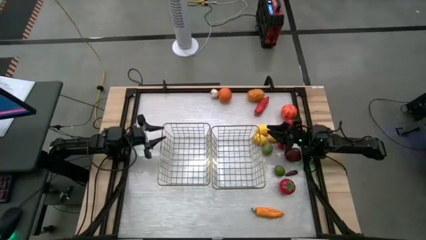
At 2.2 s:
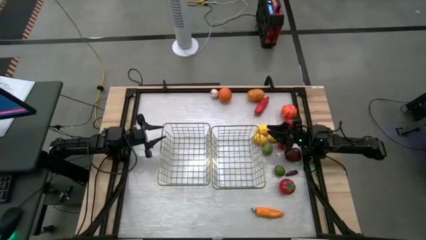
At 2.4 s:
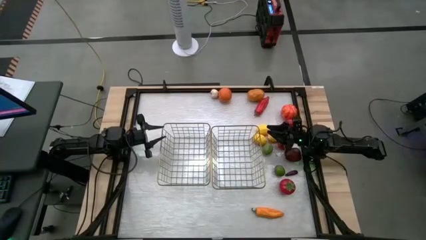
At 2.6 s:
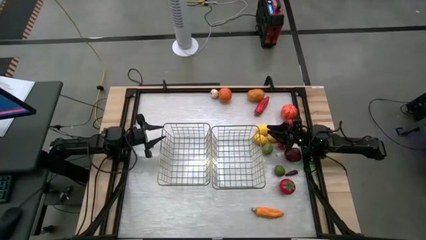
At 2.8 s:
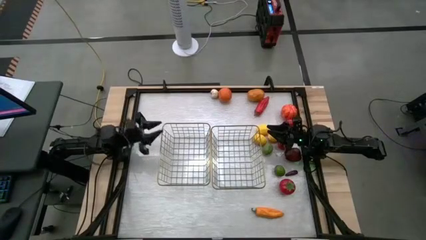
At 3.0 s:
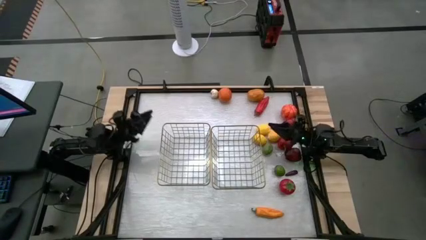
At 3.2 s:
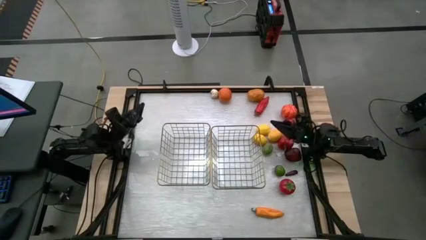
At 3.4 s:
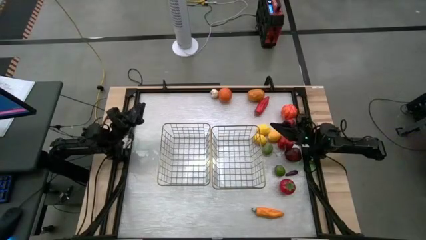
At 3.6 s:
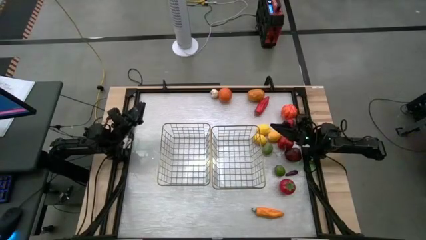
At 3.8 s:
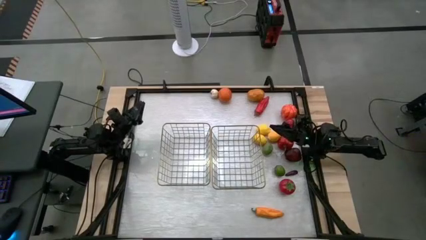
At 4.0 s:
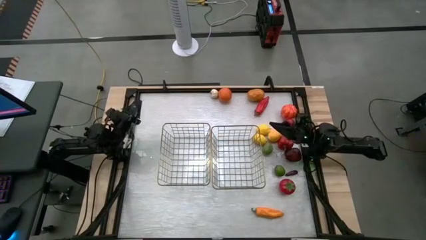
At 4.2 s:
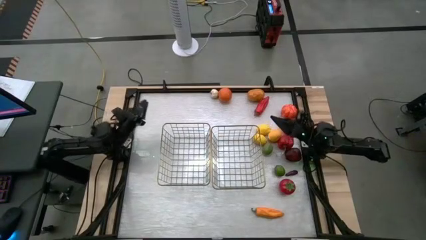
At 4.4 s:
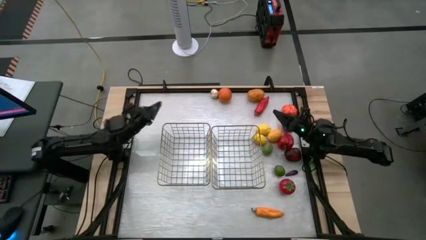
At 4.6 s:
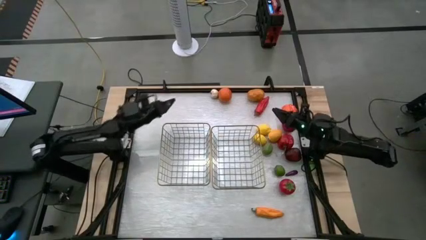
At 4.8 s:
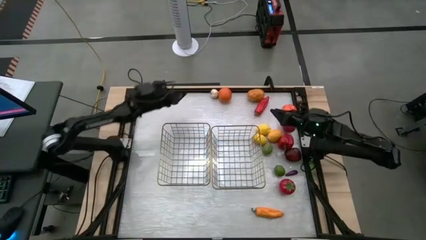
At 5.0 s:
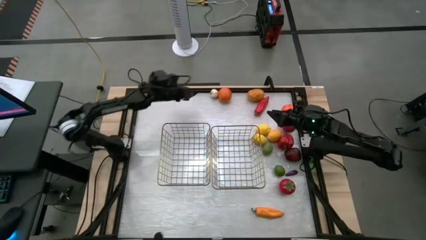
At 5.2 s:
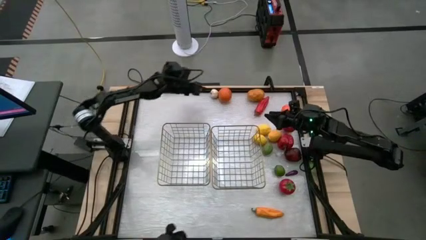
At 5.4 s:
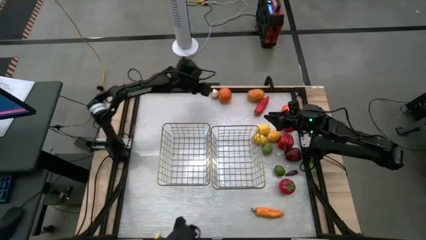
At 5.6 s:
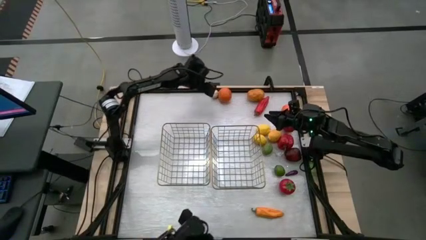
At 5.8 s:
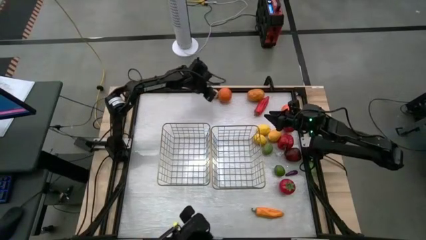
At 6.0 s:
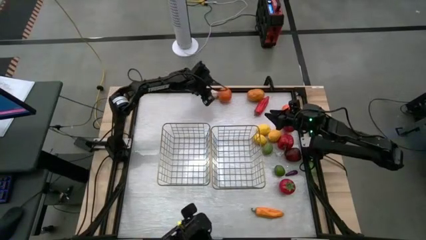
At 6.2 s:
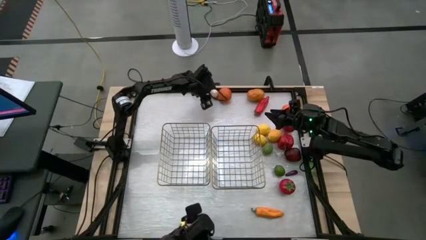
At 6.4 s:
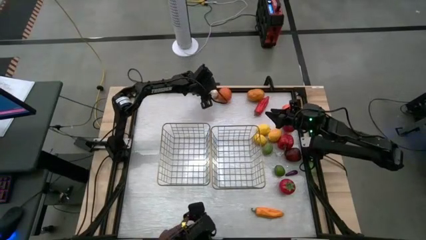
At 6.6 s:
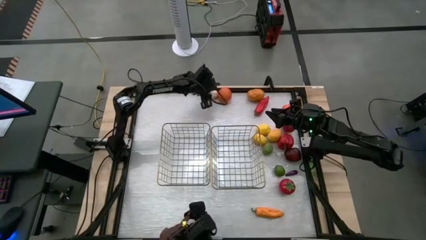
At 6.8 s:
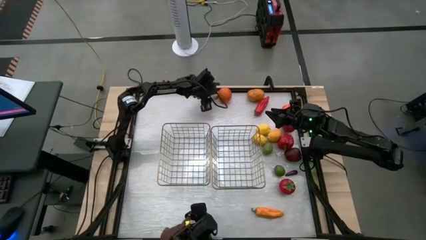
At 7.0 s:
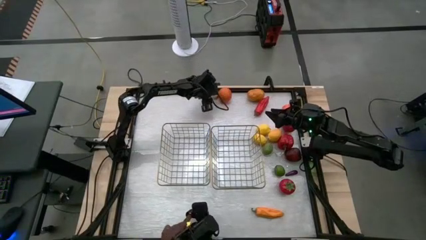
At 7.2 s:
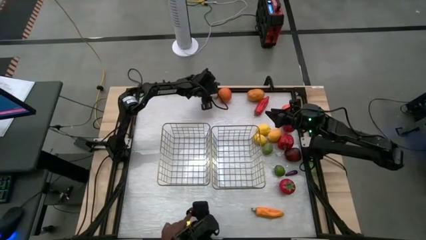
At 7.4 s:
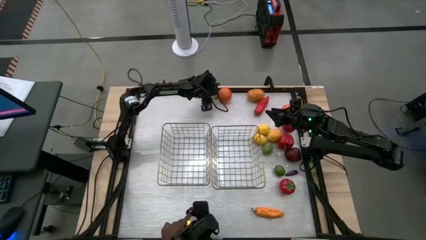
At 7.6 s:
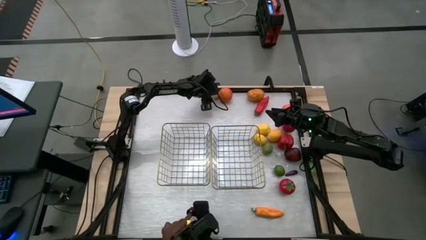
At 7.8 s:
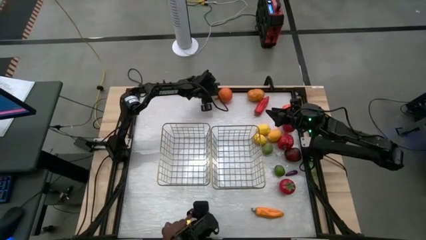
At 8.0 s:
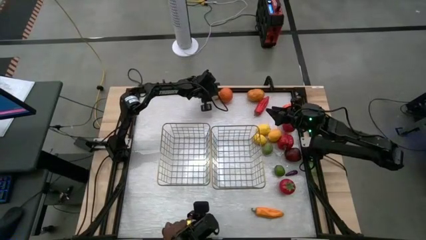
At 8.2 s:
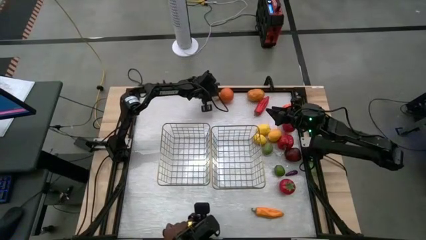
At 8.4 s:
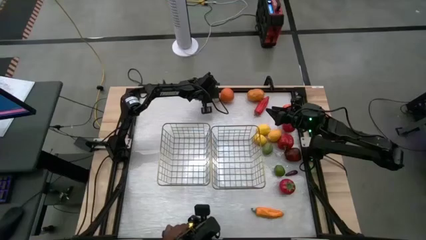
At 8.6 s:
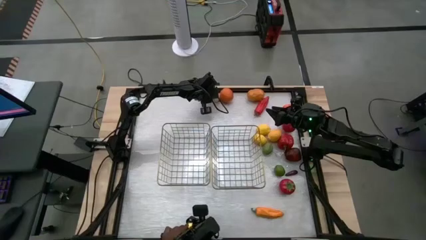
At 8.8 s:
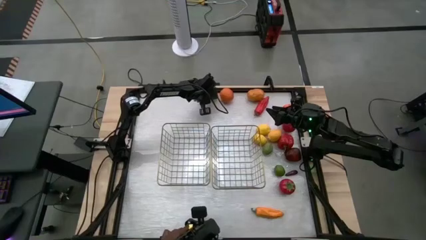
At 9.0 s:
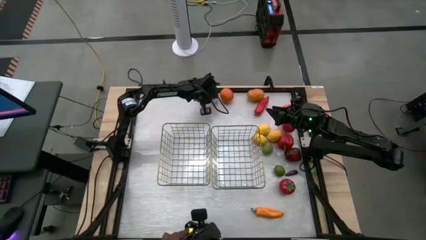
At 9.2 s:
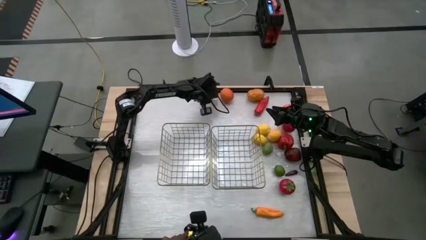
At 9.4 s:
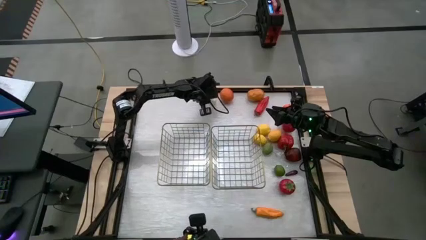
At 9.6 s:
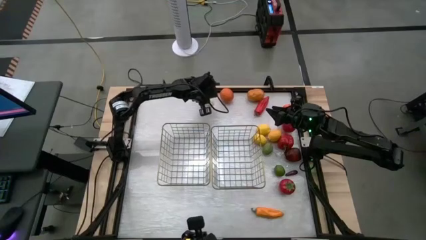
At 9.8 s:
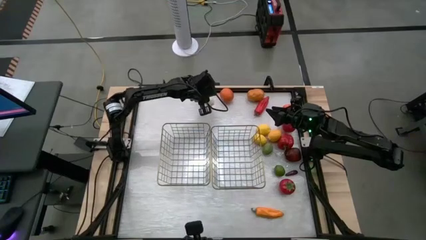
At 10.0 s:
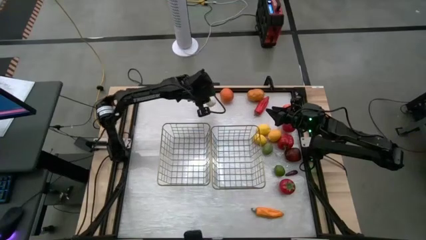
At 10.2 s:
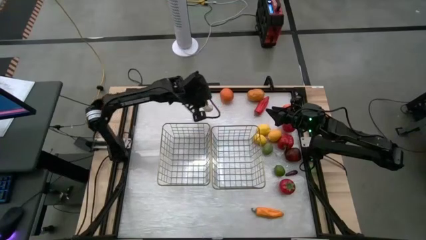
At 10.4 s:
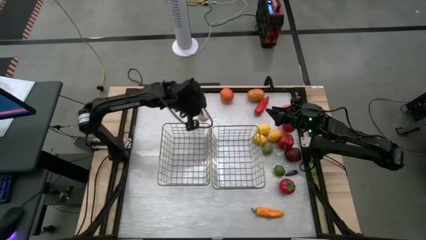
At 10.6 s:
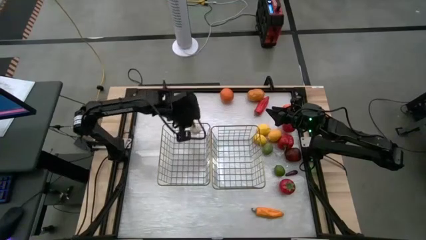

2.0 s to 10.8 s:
Task: Sort produce into baskets
Put the garlic into the left wire basket

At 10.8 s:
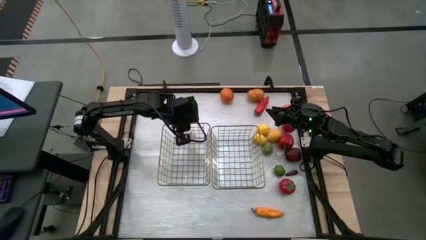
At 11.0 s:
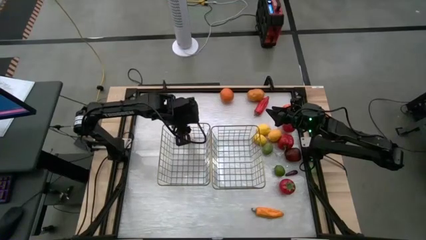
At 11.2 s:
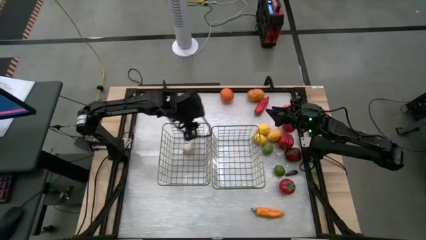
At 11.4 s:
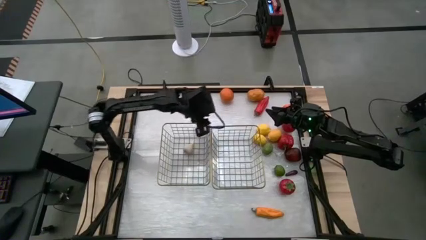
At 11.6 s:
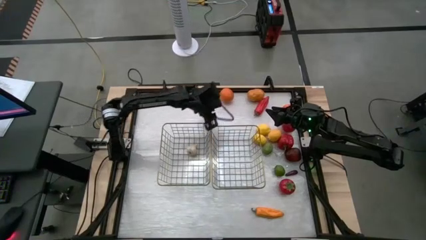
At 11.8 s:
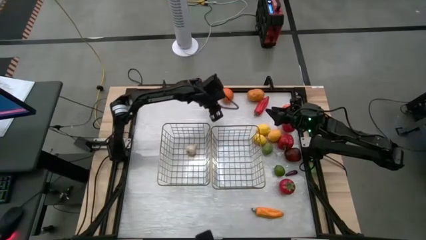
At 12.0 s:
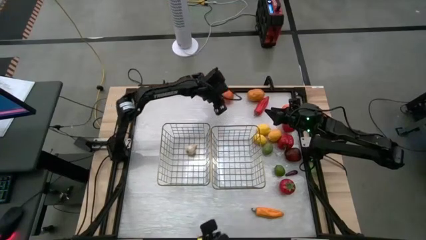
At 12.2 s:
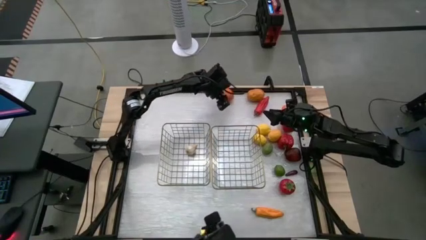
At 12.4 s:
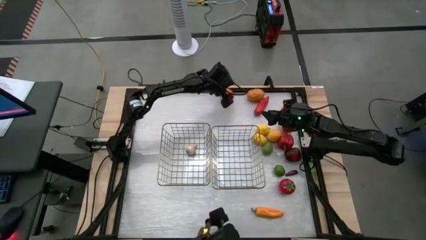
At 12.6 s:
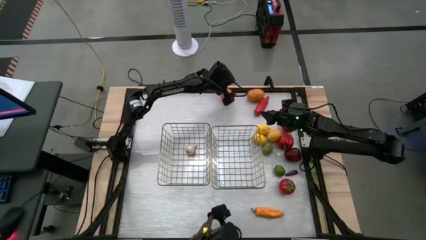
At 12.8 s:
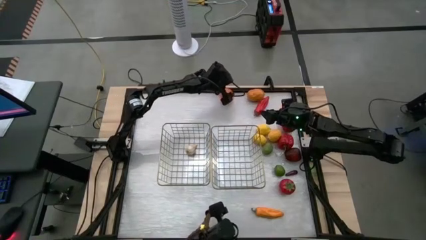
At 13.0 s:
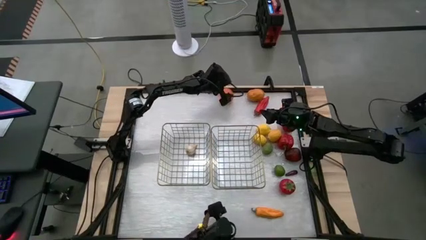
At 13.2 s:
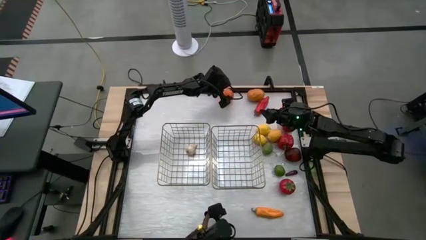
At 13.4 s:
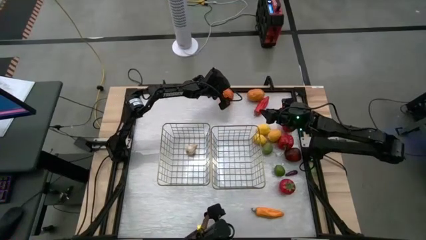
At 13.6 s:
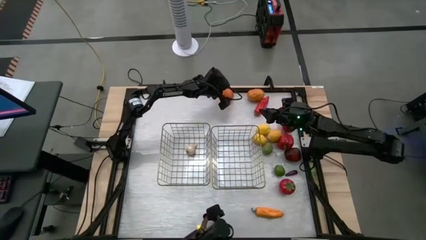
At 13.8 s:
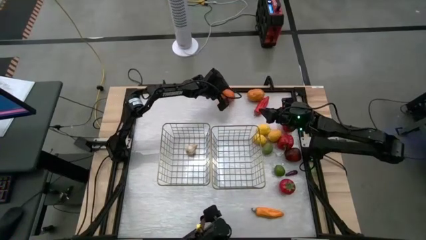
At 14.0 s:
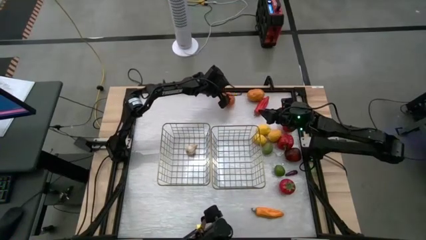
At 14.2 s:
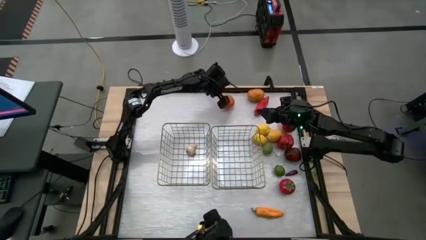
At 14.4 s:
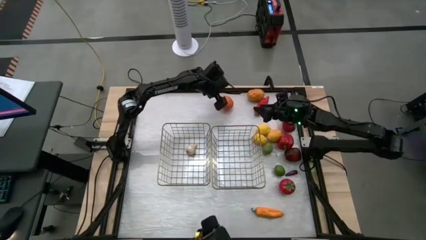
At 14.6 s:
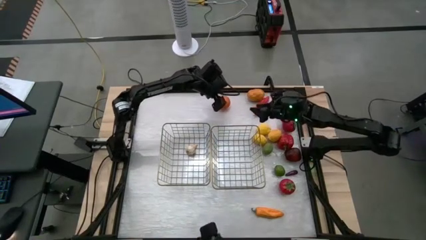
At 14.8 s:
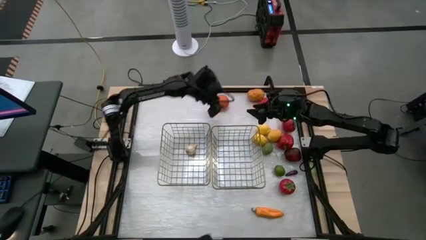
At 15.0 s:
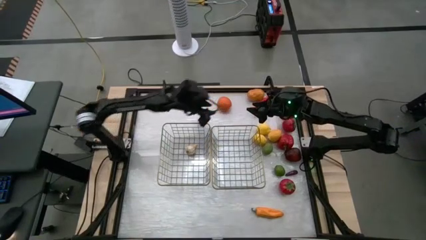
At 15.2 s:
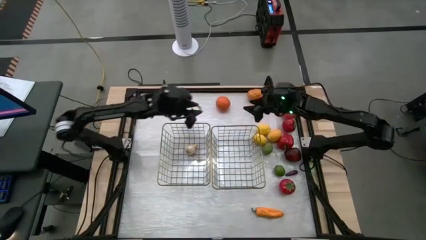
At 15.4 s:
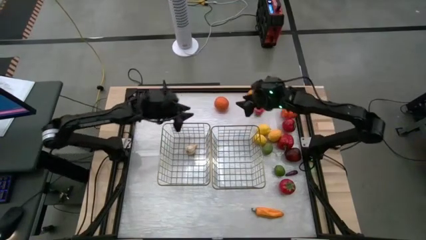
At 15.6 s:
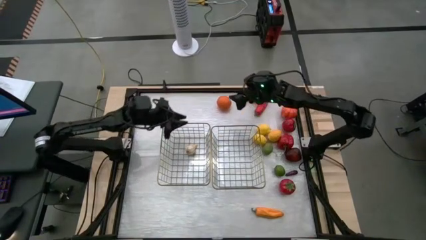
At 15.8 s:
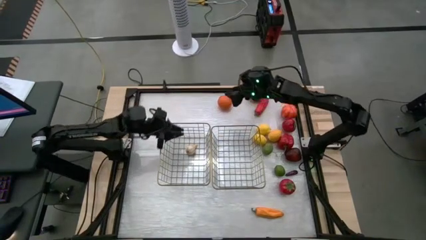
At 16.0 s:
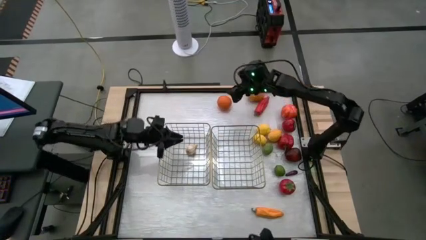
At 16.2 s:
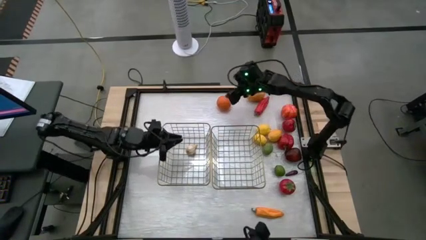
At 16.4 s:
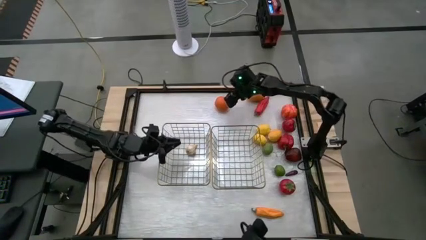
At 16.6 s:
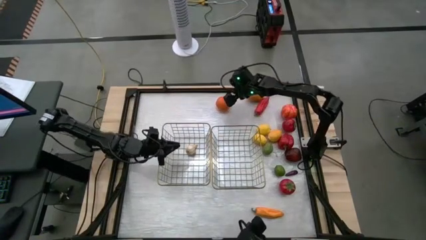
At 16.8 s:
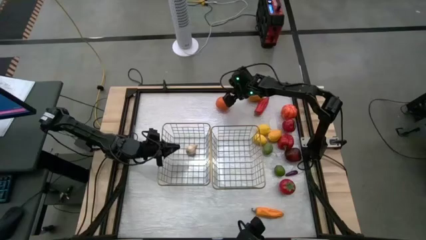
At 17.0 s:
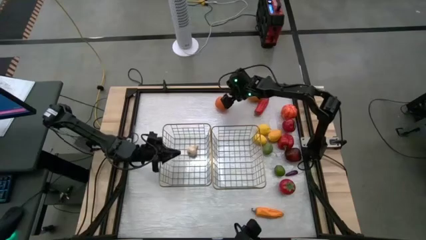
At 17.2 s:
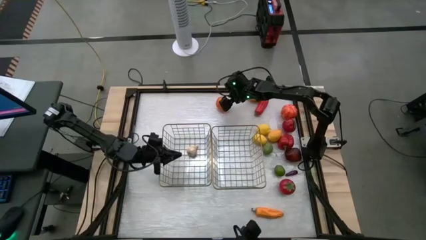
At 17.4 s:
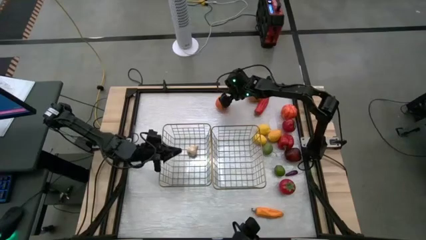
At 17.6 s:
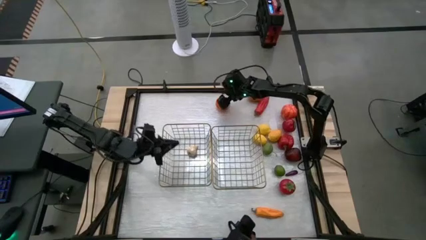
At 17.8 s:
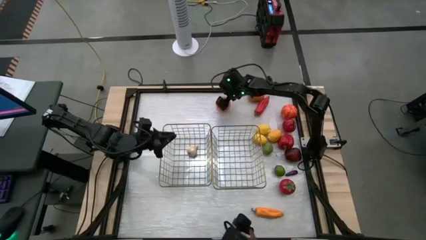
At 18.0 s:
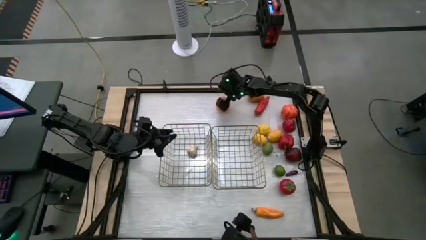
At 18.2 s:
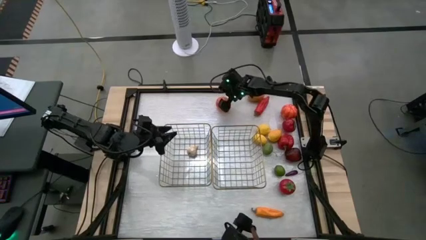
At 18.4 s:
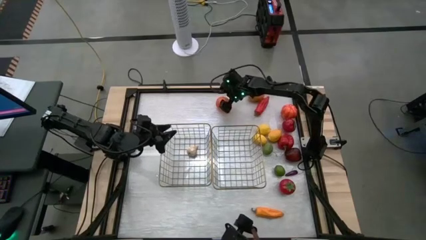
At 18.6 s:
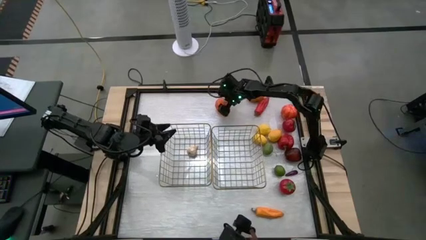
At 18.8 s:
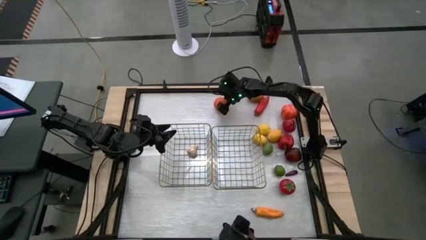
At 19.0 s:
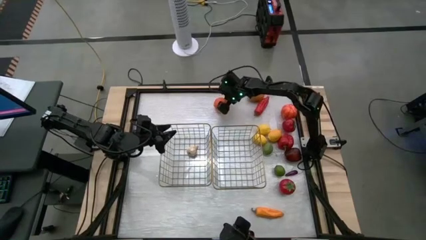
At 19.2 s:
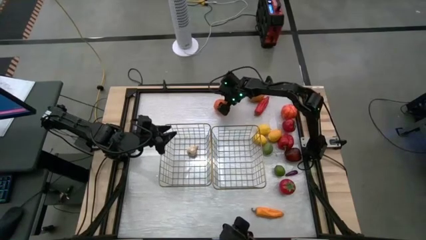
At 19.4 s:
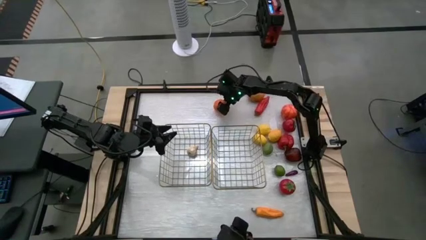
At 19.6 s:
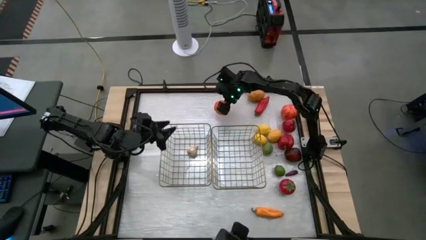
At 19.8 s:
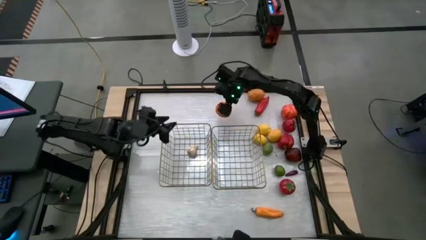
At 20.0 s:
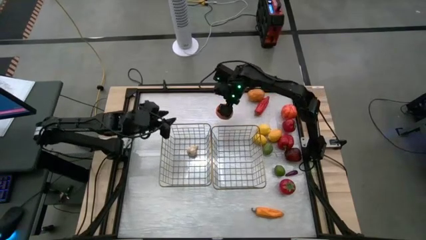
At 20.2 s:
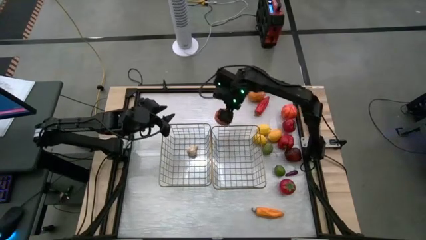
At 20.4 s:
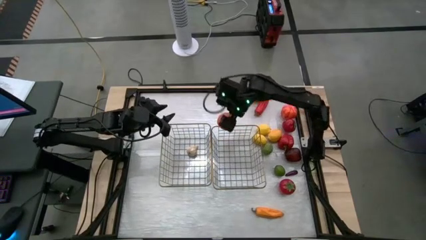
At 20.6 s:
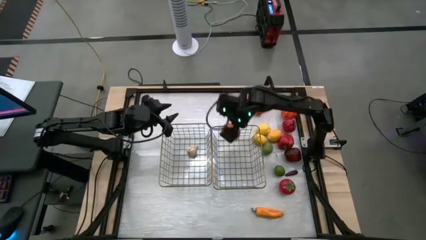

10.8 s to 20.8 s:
Put the orange into the right wire basket
